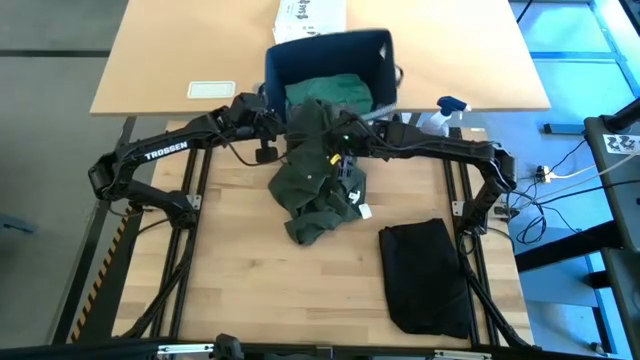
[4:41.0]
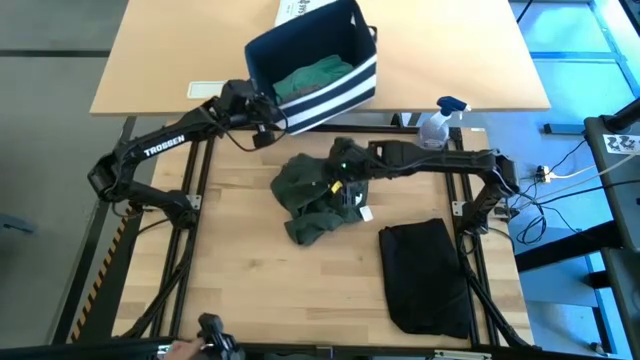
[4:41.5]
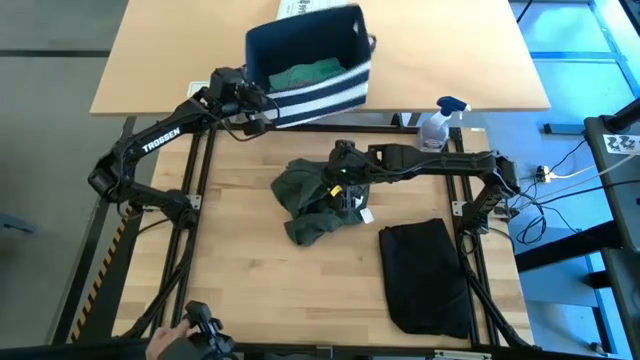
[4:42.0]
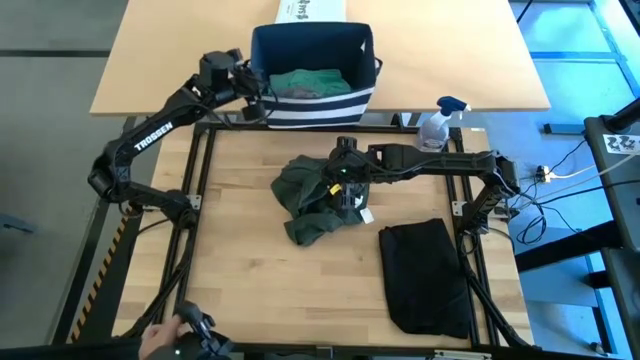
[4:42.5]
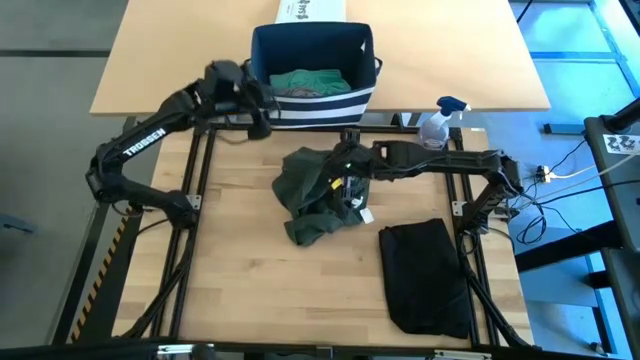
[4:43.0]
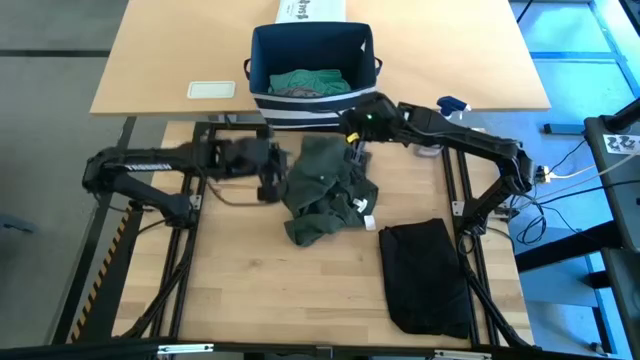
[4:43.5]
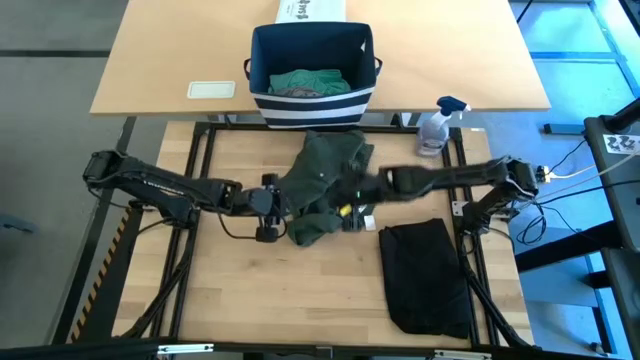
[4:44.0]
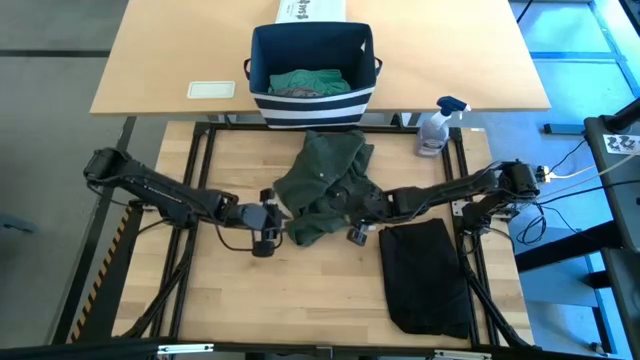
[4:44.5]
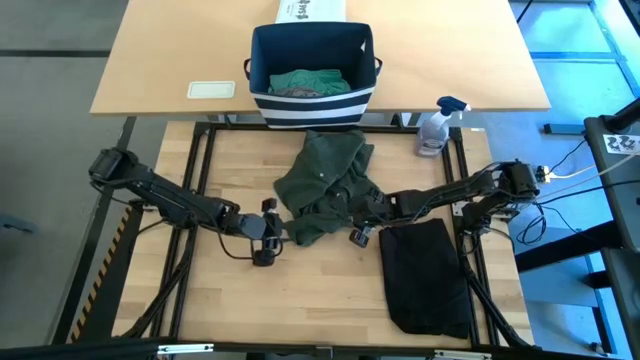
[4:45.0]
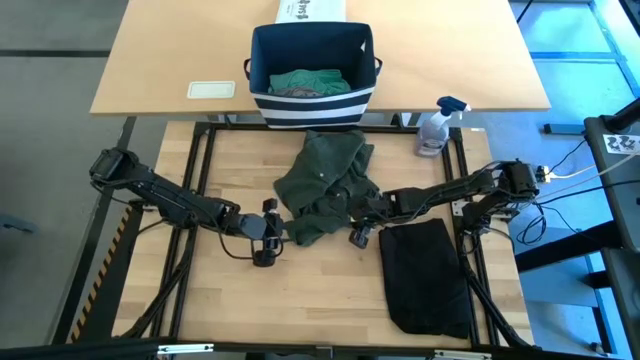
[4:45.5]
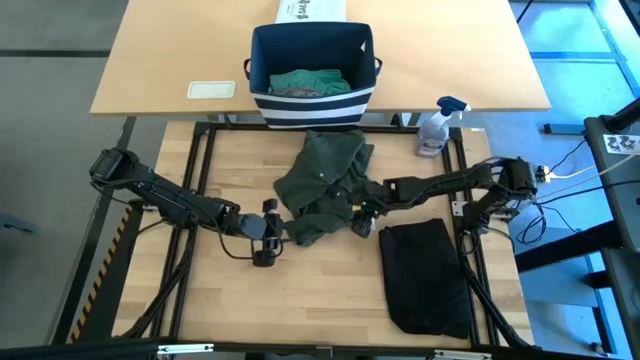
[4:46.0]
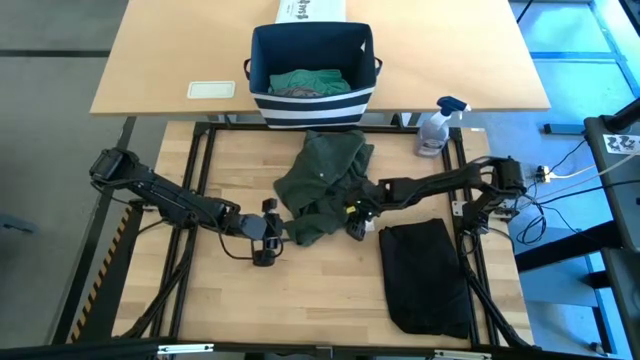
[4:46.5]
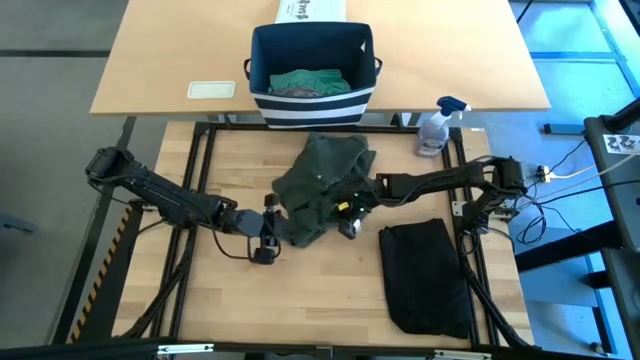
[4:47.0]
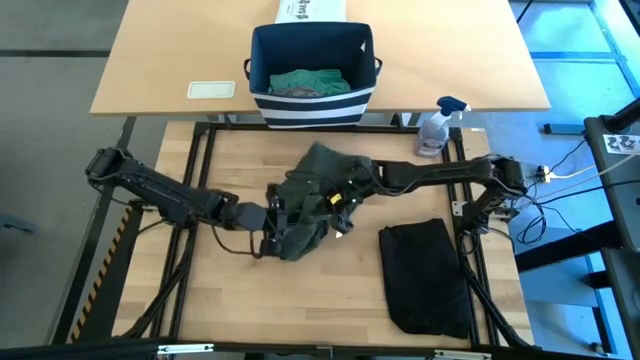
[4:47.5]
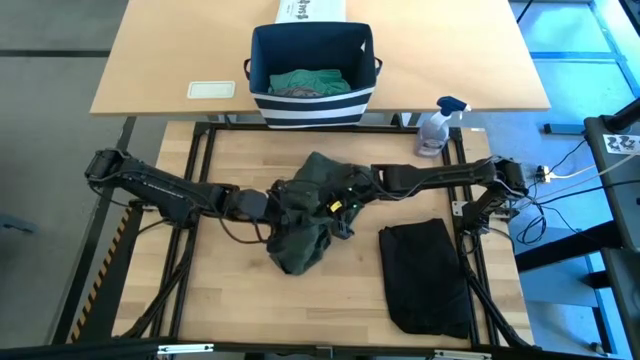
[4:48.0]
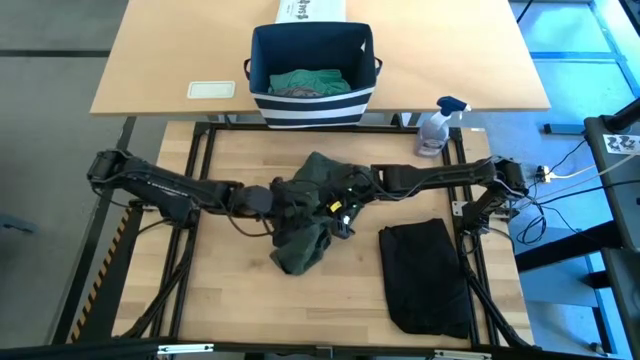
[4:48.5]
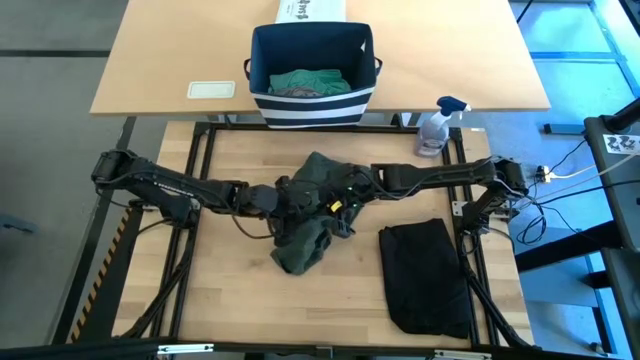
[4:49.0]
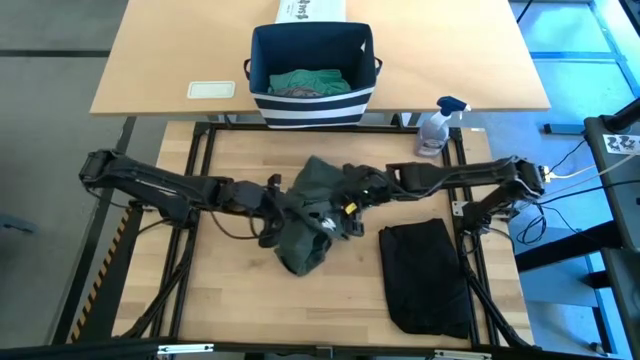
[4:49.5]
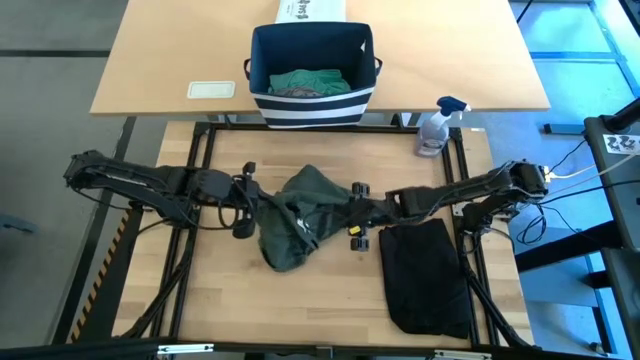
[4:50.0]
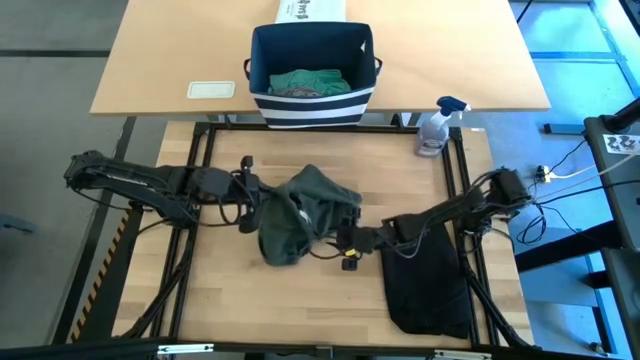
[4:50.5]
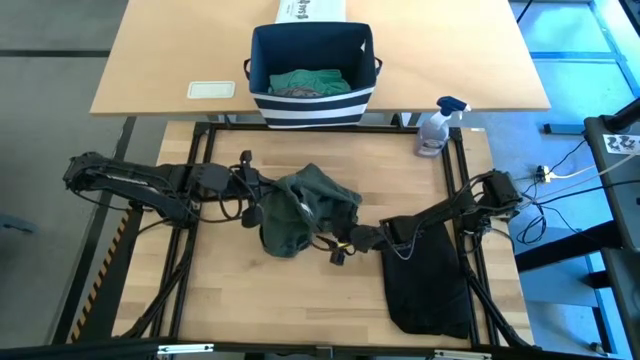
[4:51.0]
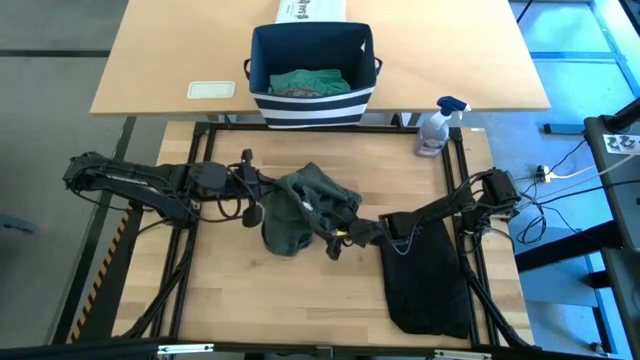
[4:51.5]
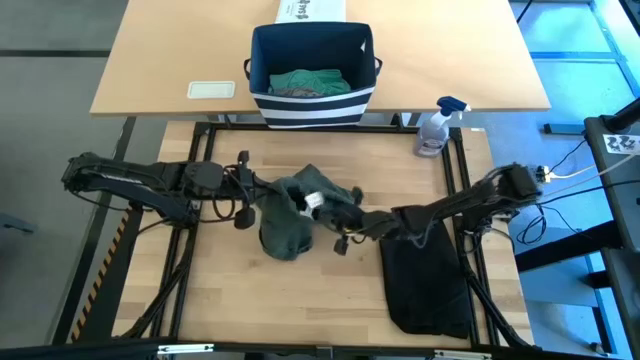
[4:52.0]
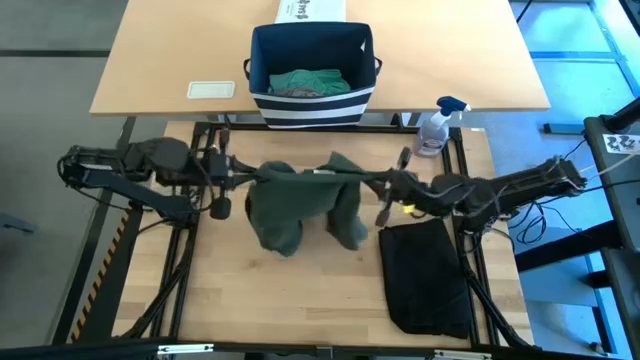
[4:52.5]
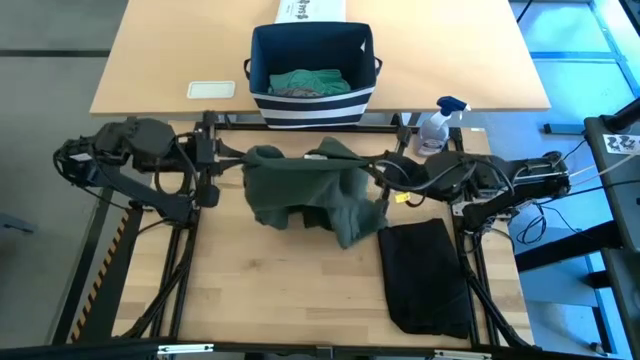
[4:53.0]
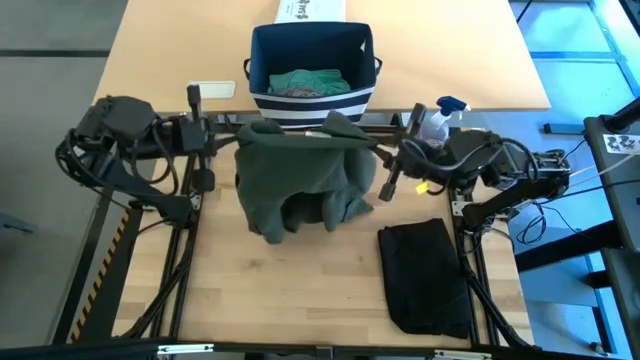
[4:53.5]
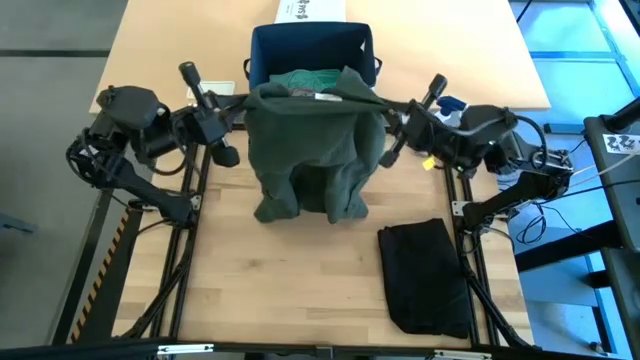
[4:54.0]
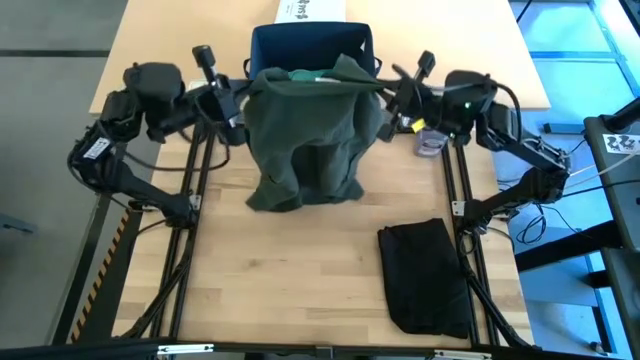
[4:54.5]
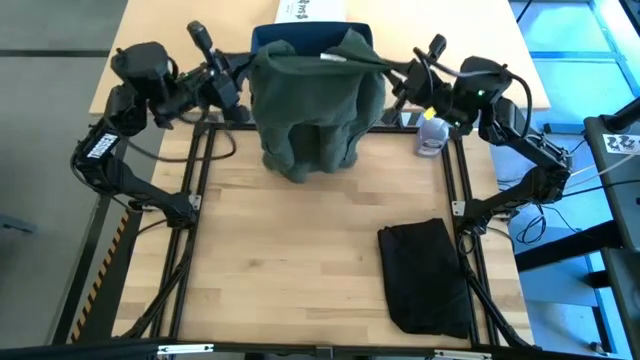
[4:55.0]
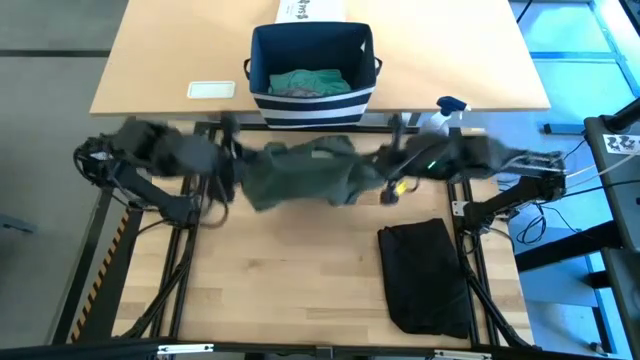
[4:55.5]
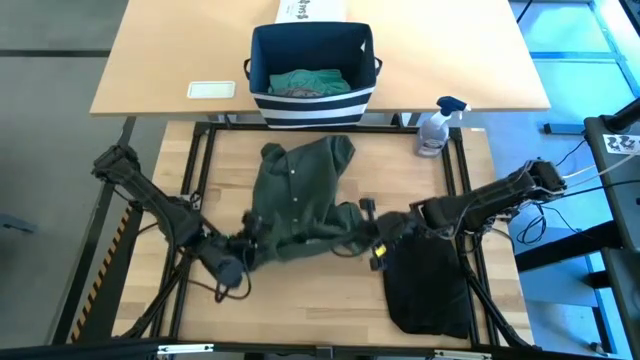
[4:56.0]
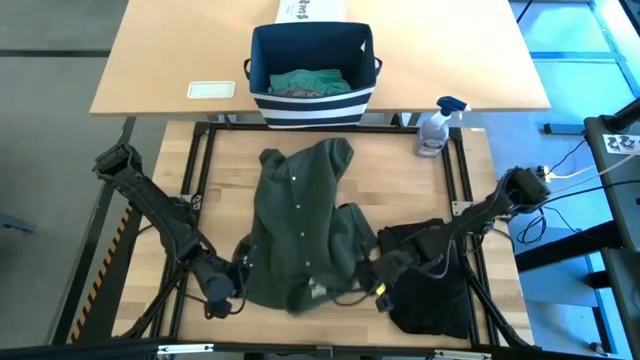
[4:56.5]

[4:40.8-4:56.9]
Task: Fold Laundry from Bin
Fold the green polo shirt

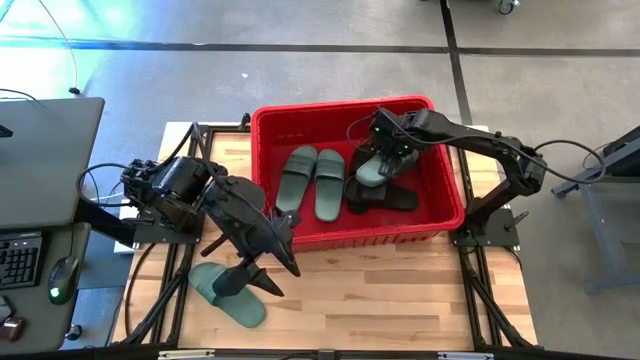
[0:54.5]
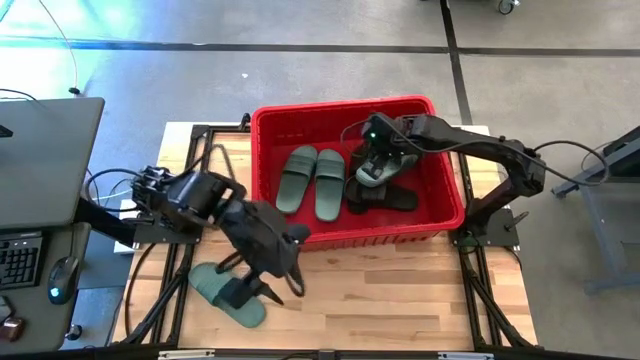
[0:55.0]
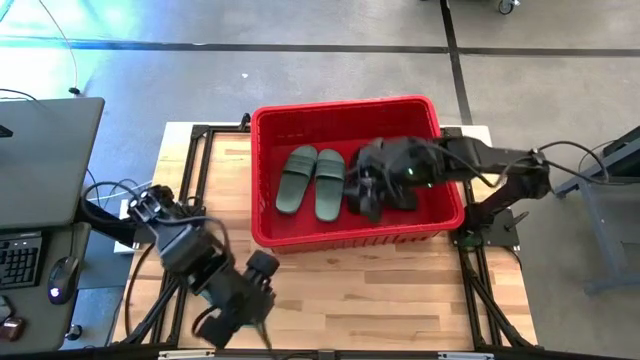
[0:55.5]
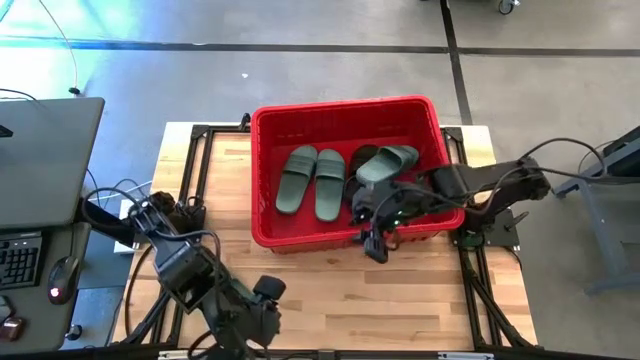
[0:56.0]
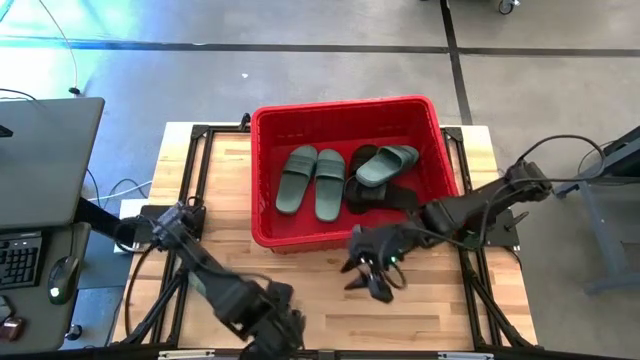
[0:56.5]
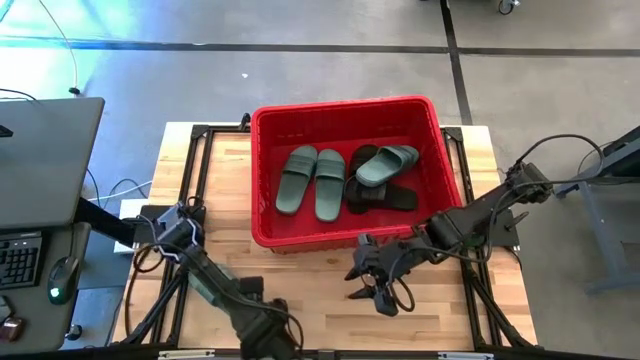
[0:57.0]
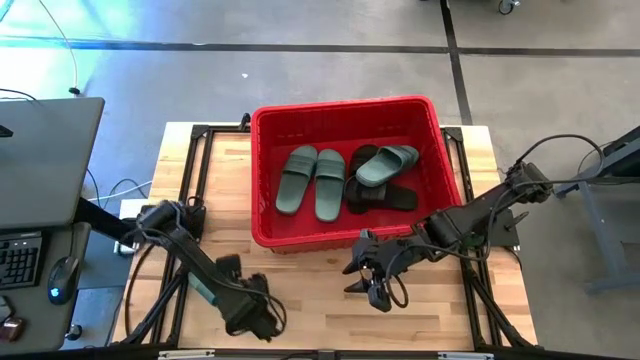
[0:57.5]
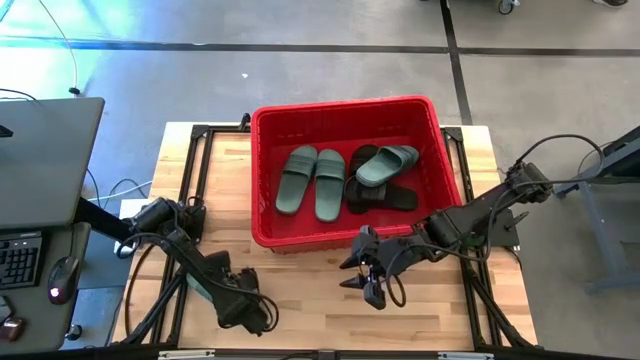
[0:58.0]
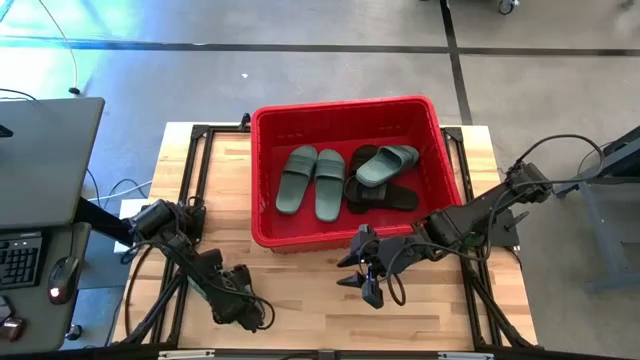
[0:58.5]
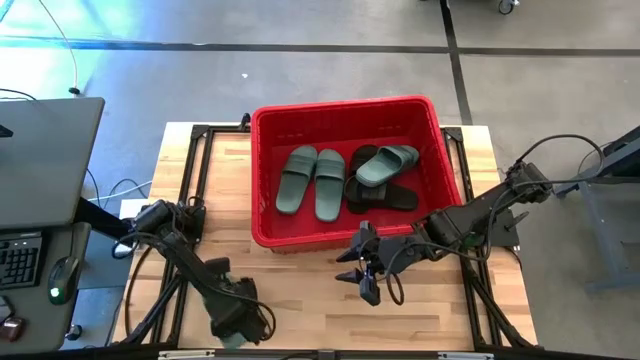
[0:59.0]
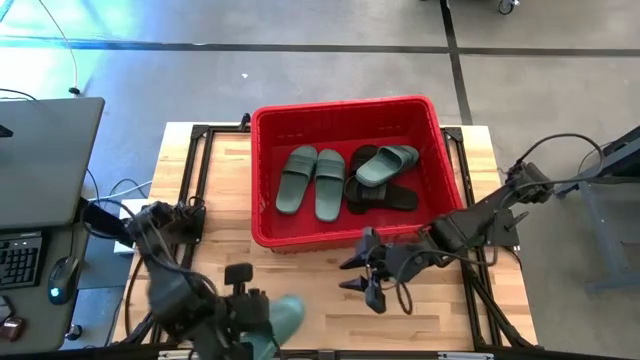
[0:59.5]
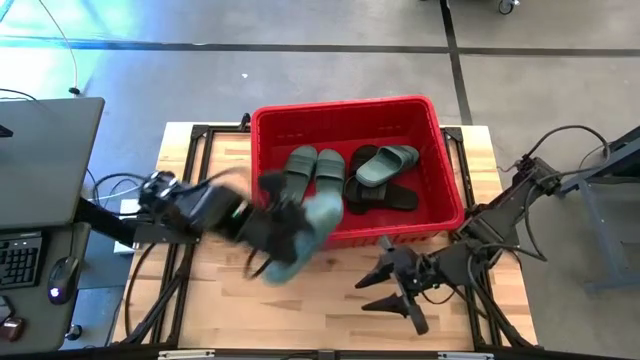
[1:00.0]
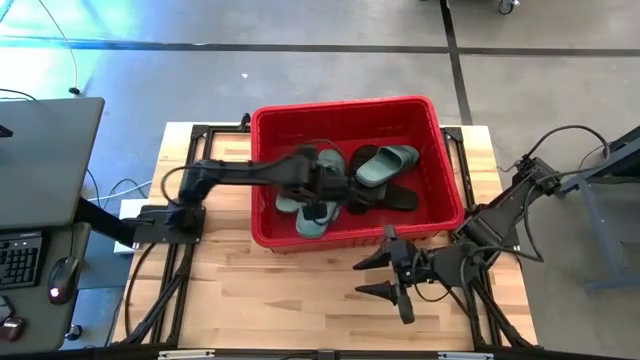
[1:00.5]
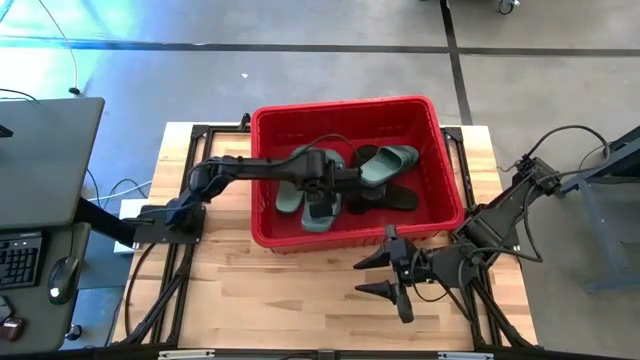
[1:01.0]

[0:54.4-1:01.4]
Task: Pick and place slides into bin
Put the green slipper into the red bin
